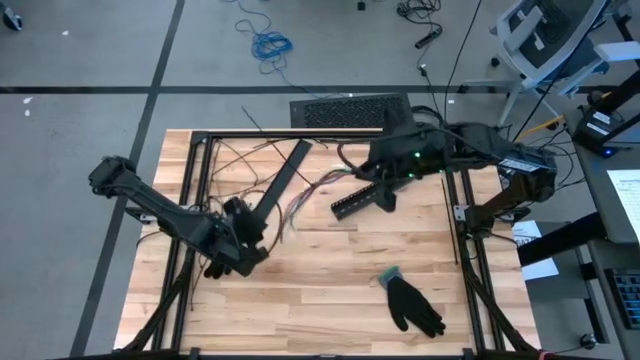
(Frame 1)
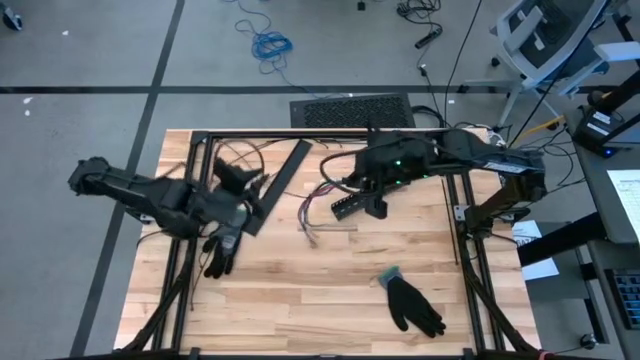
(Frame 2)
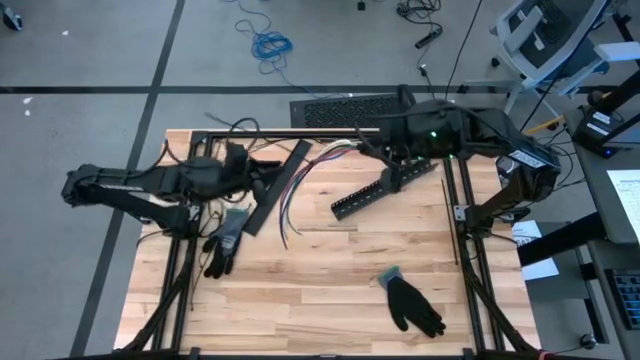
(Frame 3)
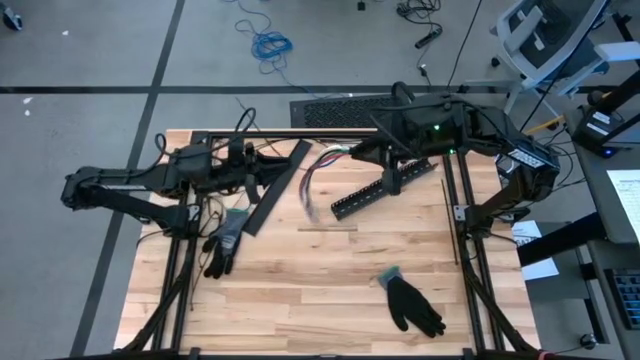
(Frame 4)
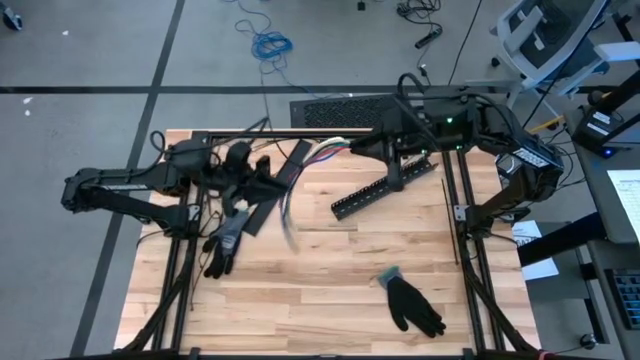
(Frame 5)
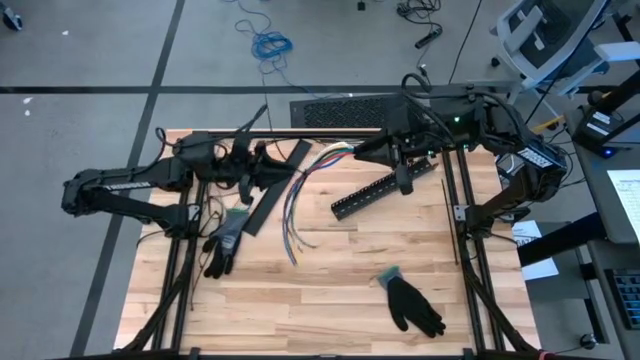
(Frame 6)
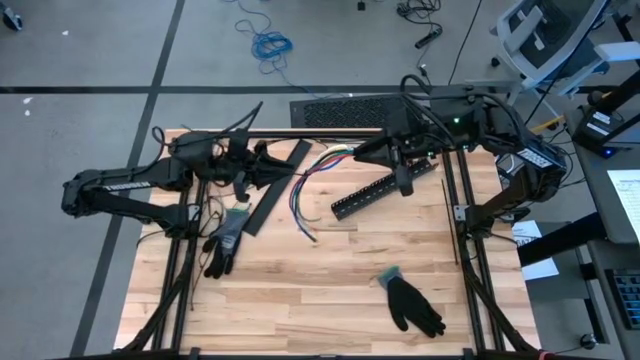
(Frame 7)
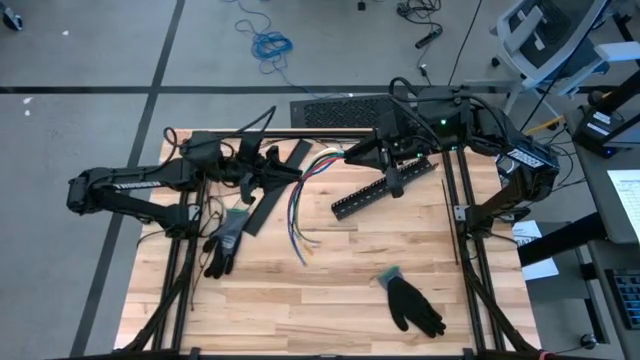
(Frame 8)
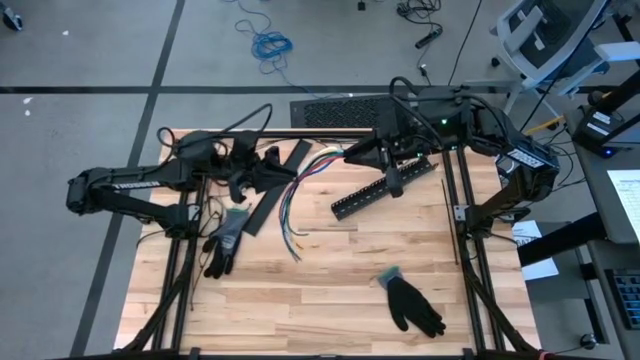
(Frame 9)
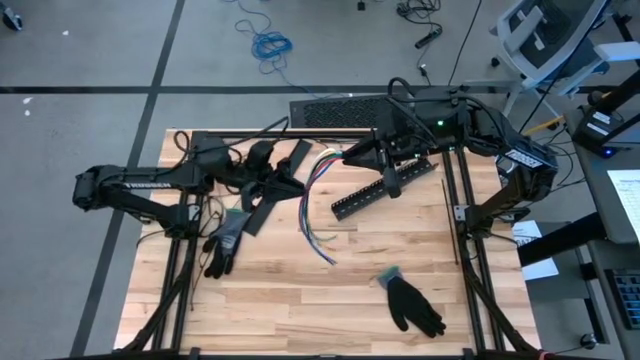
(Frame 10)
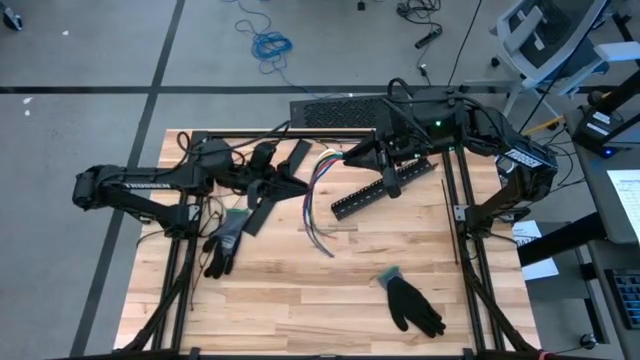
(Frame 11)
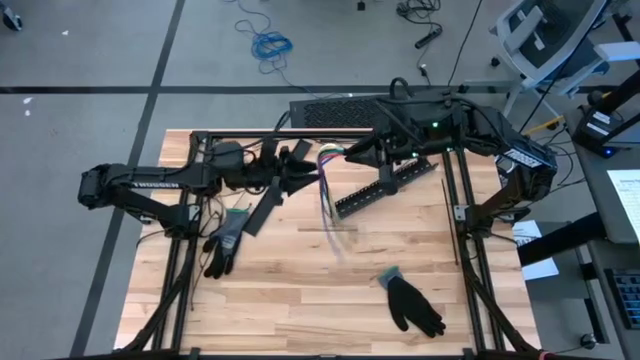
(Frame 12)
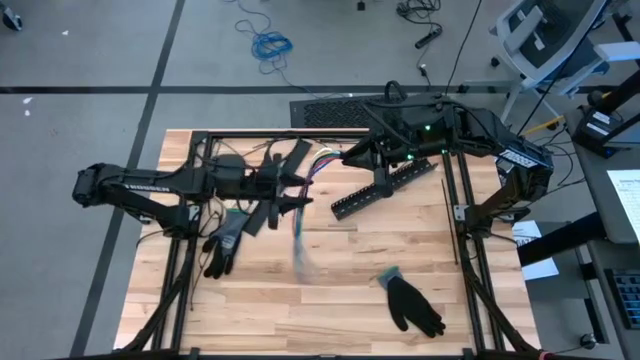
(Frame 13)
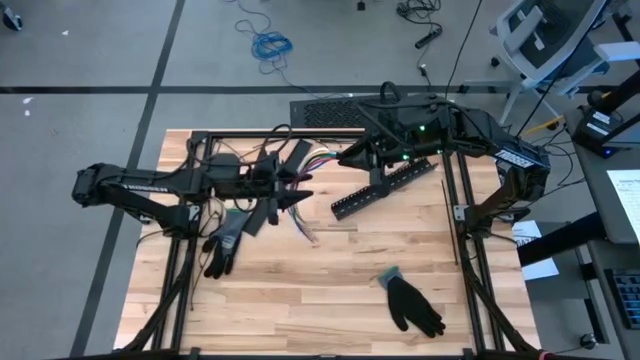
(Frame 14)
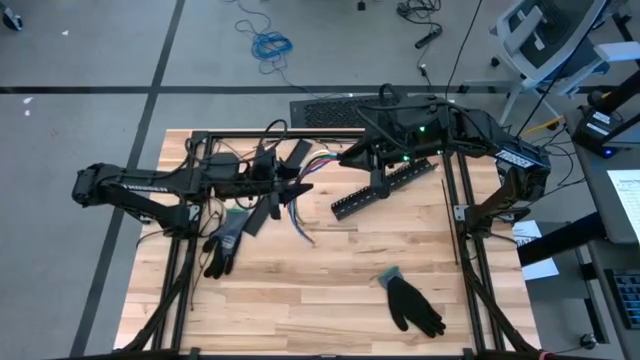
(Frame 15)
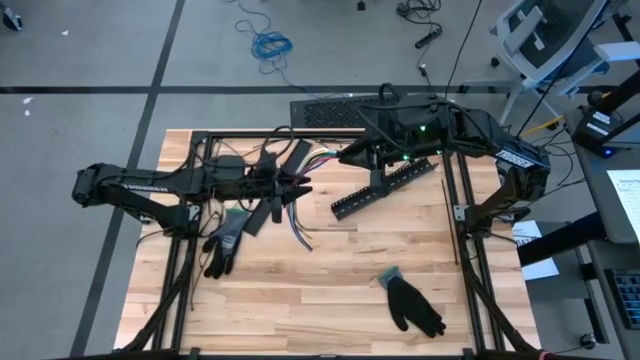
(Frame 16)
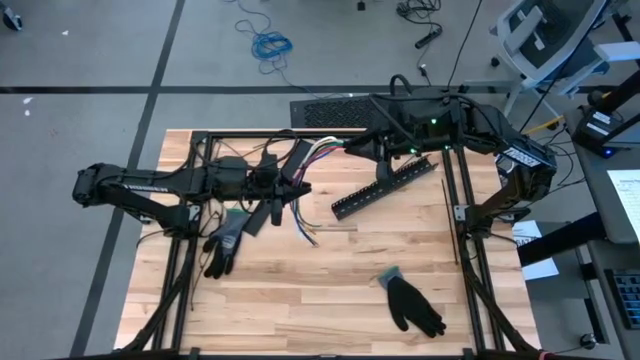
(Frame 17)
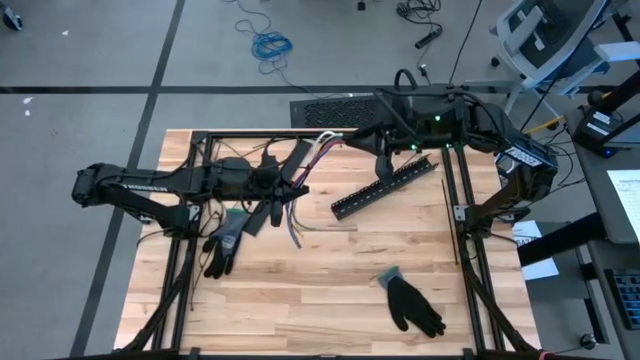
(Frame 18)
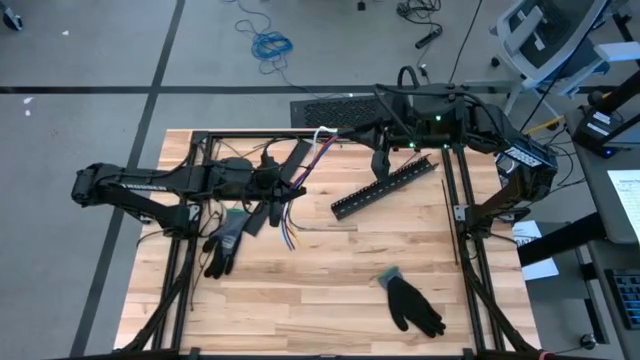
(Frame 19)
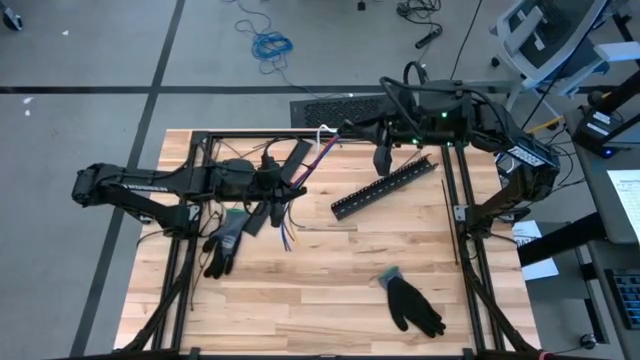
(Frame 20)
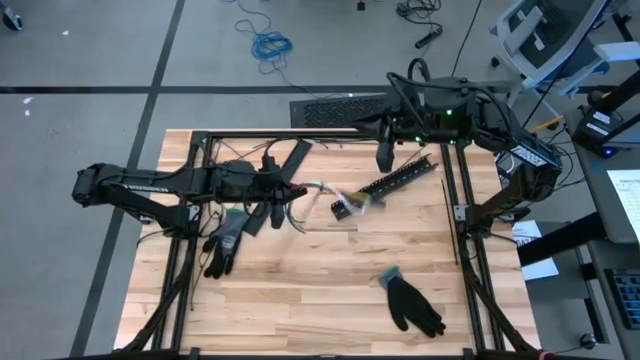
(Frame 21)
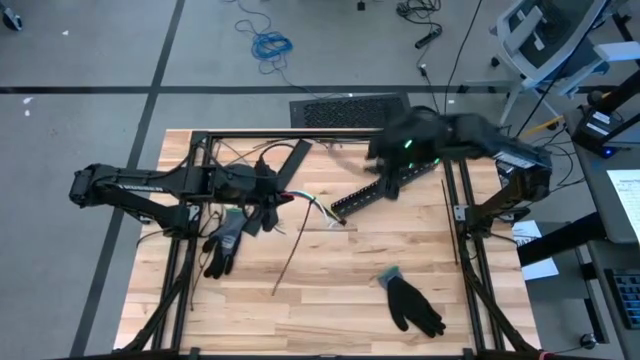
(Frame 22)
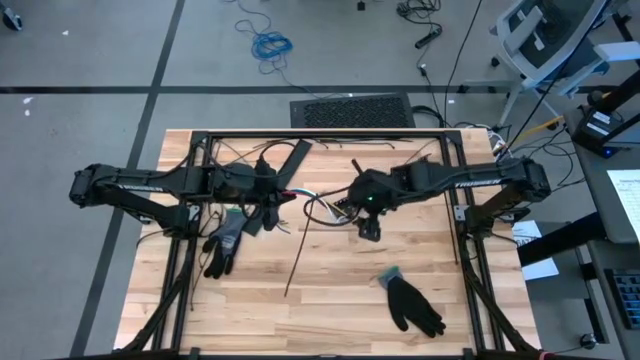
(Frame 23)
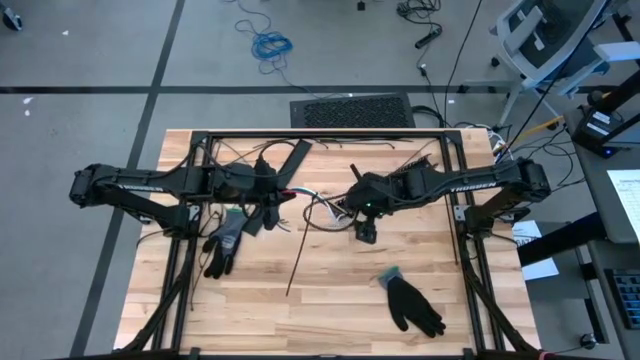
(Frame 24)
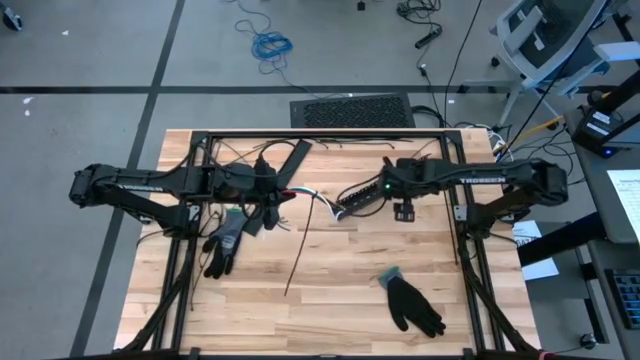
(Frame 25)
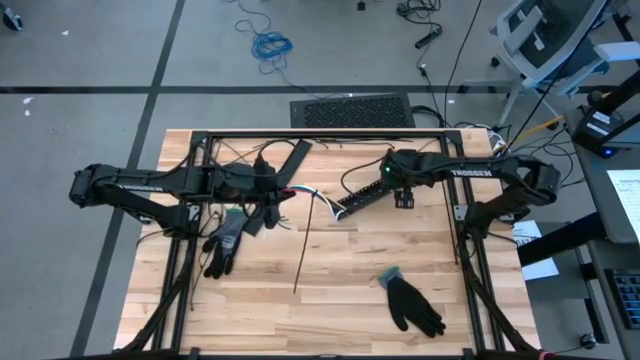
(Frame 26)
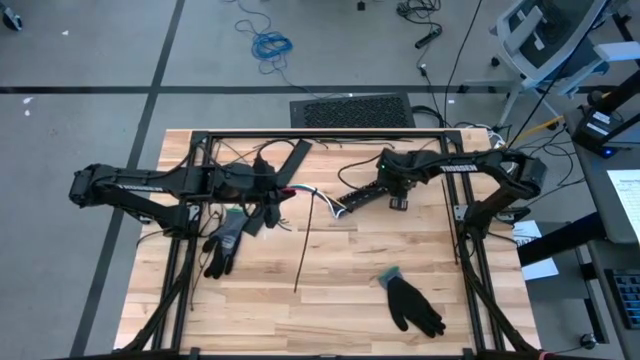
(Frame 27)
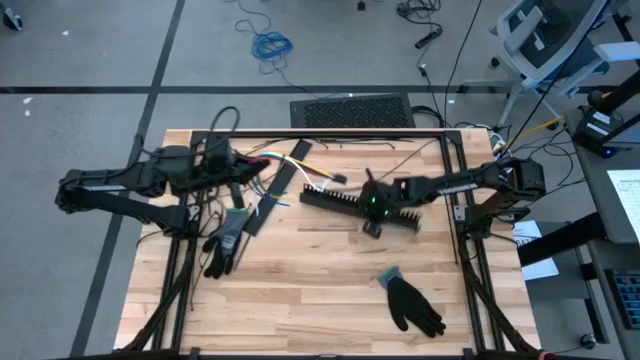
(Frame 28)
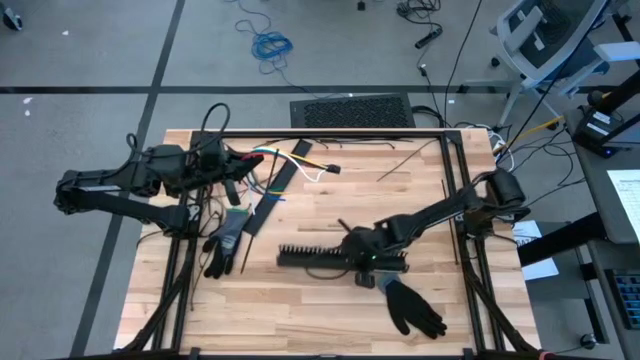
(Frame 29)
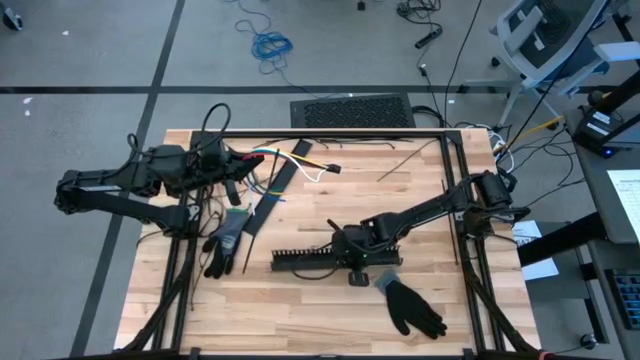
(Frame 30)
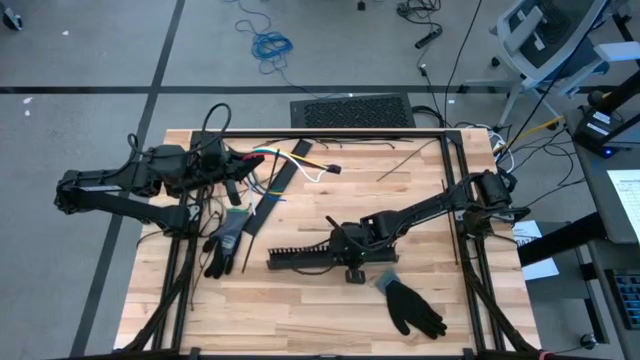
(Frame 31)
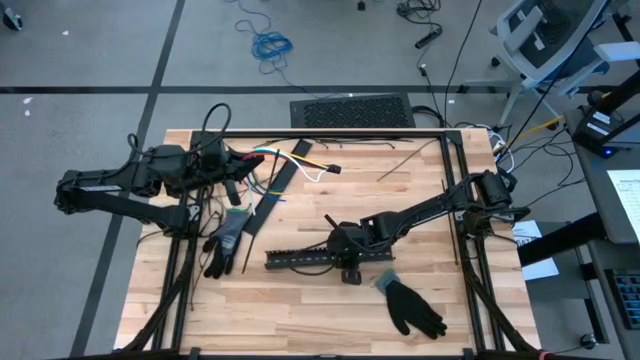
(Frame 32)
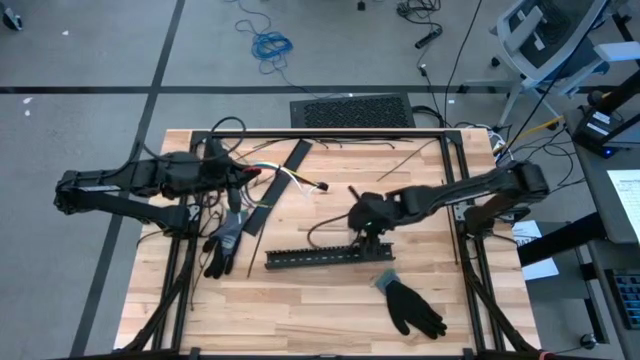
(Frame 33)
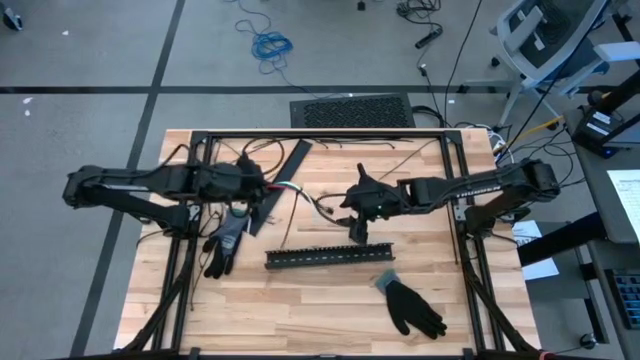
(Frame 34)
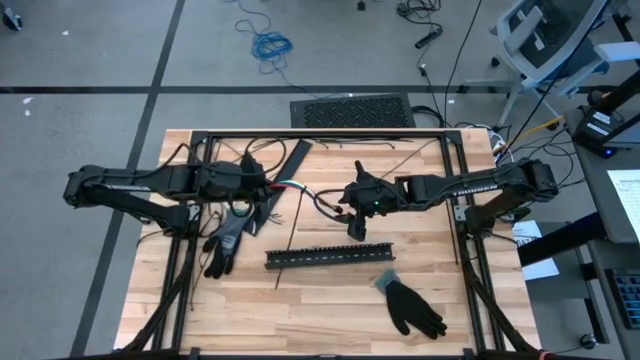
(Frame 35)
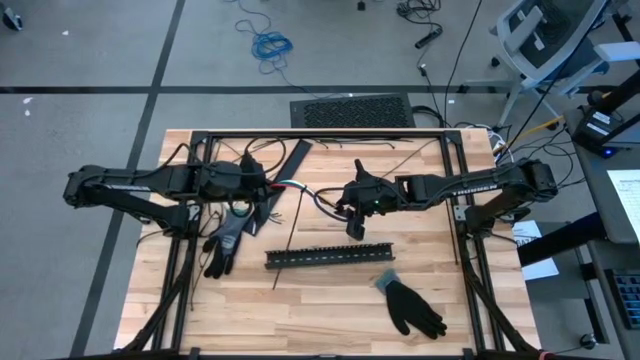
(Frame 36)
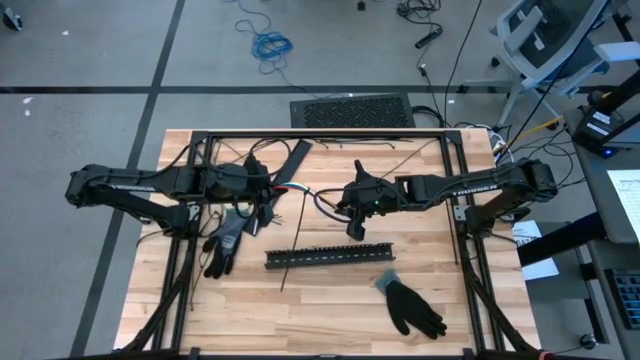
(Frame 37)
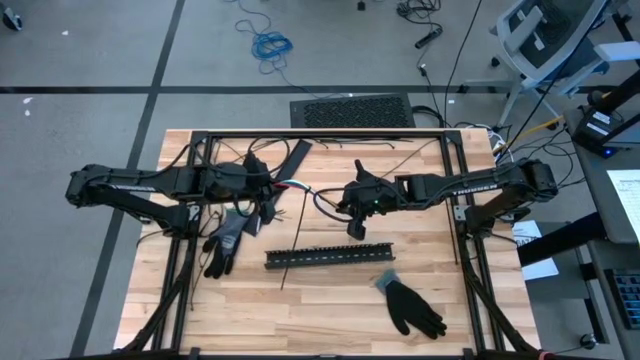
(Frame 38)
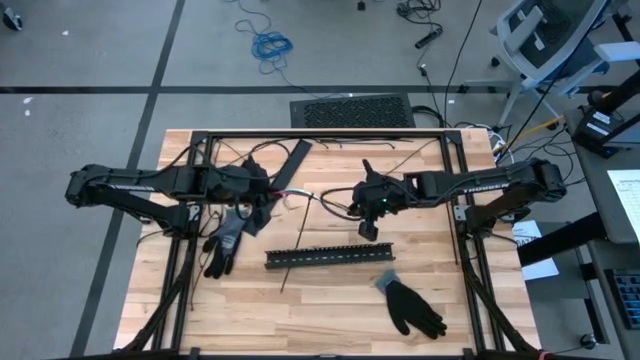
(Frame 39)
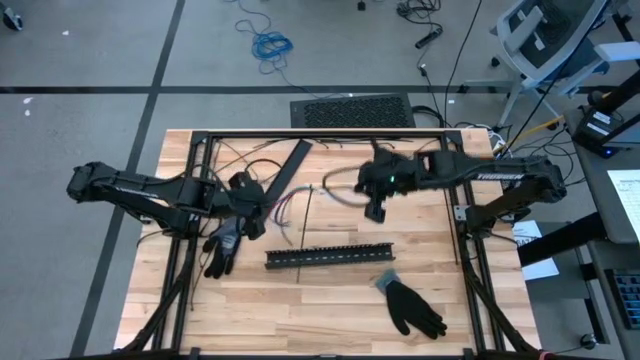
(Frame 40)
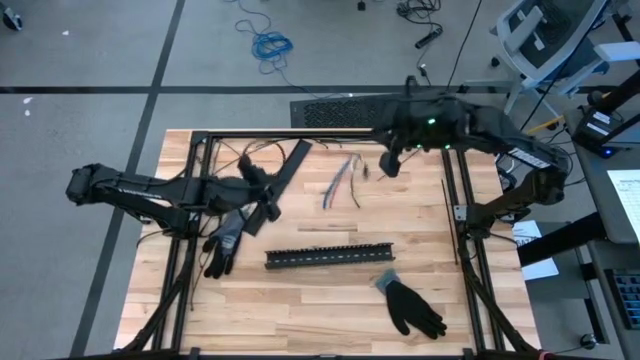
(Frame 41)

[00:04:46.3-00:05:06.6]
Task: Ziptie cables
Put the ziptied cable wires into the cable duct
